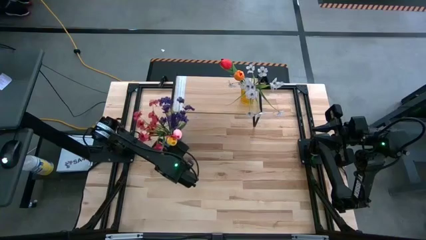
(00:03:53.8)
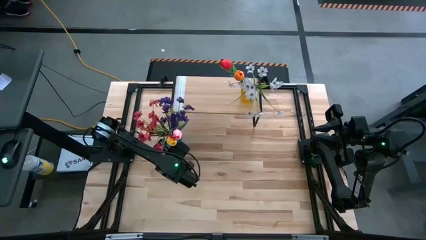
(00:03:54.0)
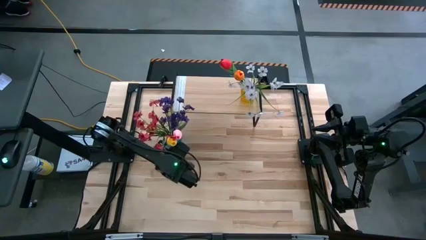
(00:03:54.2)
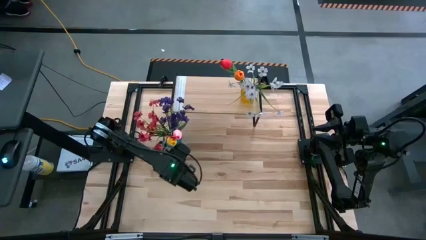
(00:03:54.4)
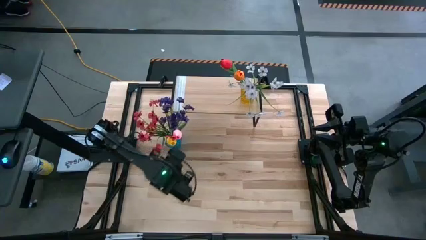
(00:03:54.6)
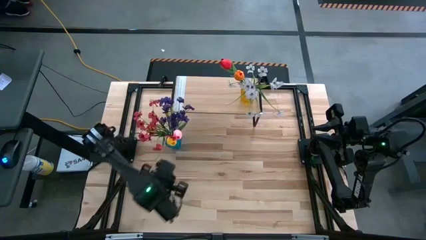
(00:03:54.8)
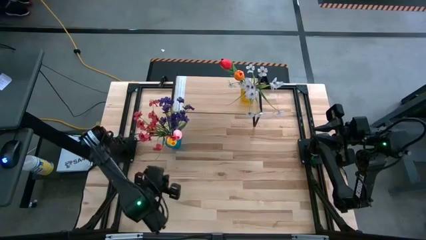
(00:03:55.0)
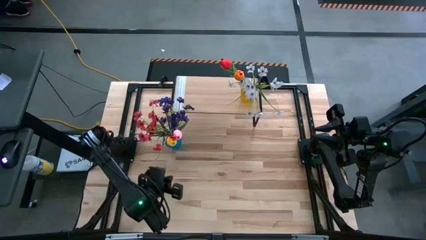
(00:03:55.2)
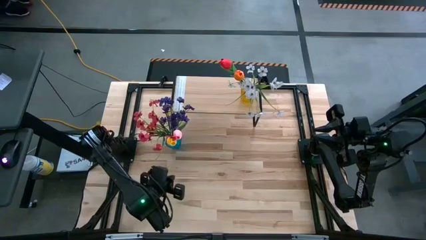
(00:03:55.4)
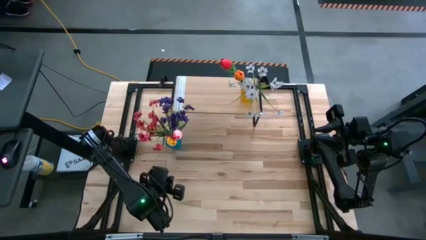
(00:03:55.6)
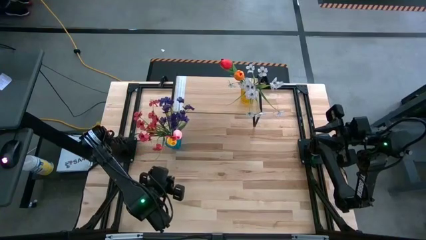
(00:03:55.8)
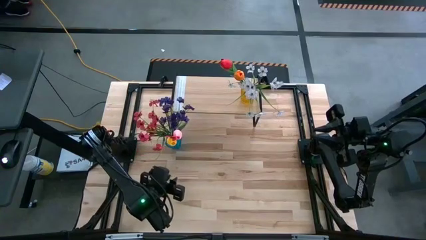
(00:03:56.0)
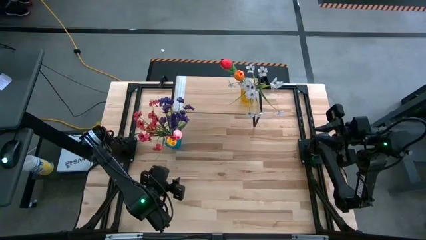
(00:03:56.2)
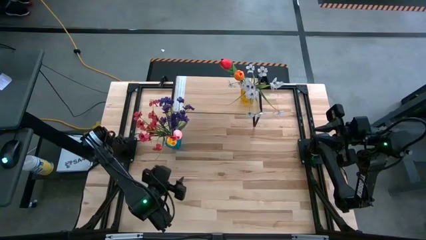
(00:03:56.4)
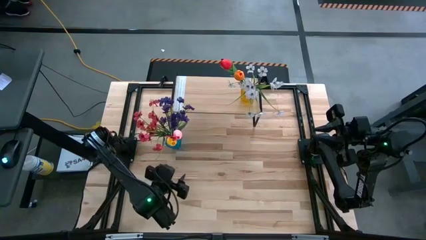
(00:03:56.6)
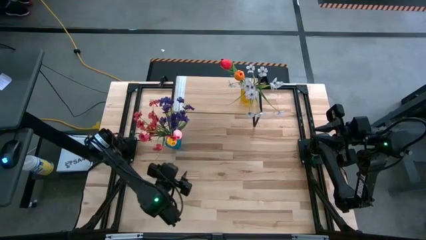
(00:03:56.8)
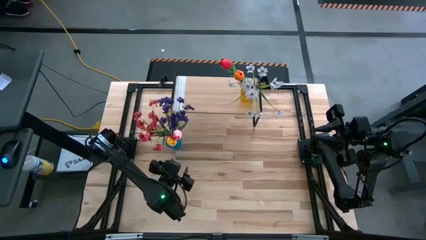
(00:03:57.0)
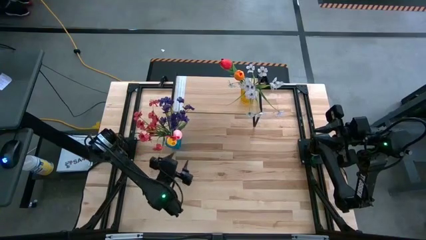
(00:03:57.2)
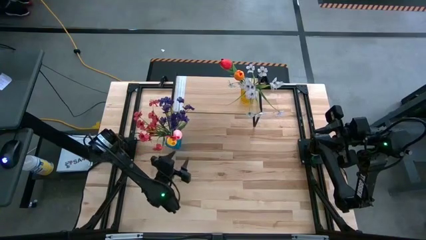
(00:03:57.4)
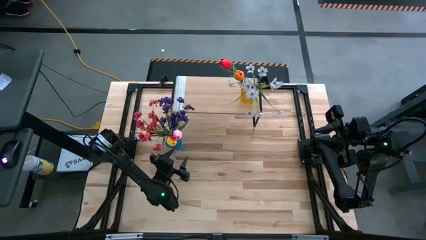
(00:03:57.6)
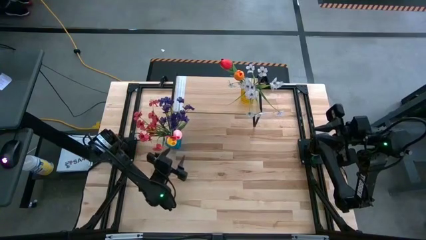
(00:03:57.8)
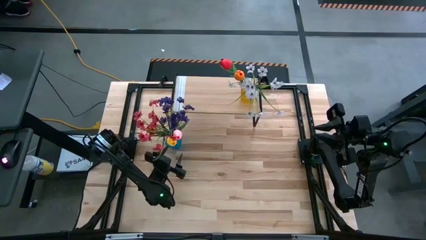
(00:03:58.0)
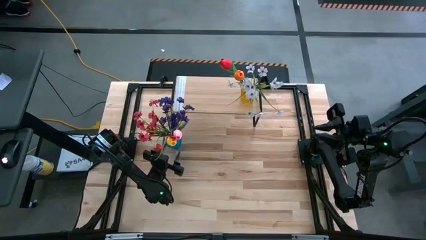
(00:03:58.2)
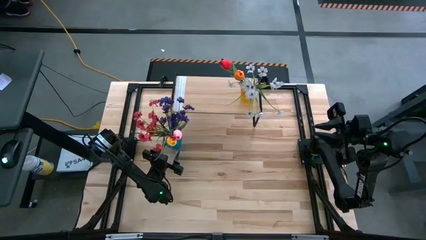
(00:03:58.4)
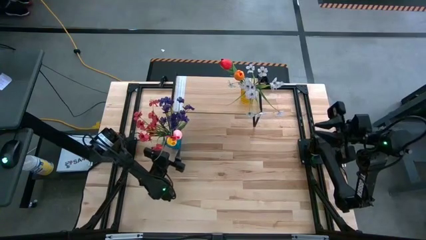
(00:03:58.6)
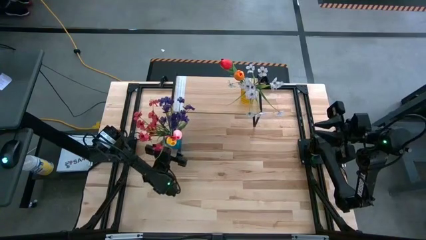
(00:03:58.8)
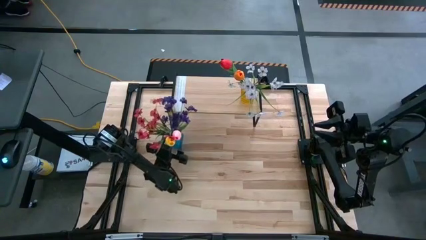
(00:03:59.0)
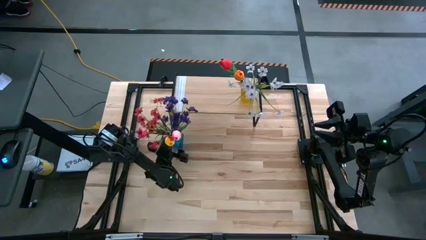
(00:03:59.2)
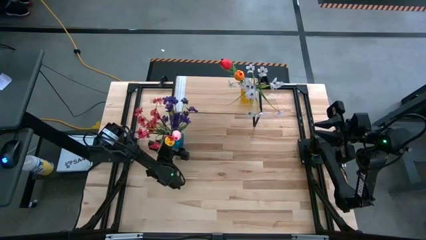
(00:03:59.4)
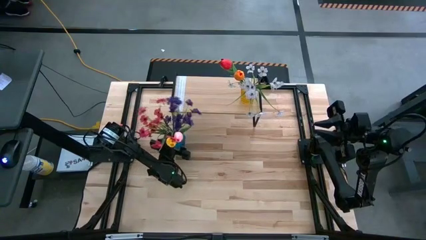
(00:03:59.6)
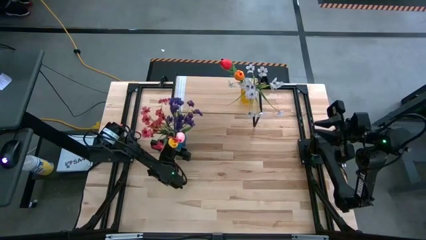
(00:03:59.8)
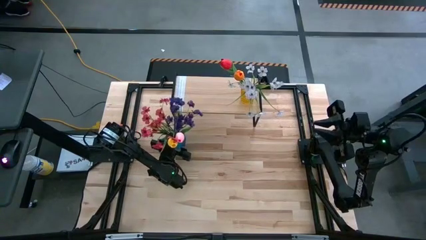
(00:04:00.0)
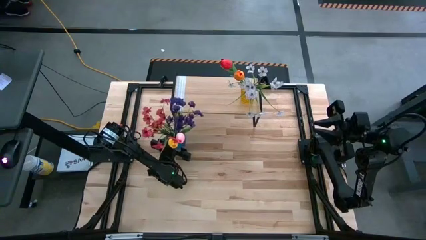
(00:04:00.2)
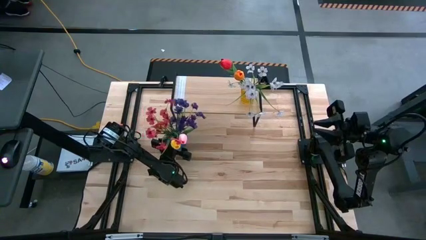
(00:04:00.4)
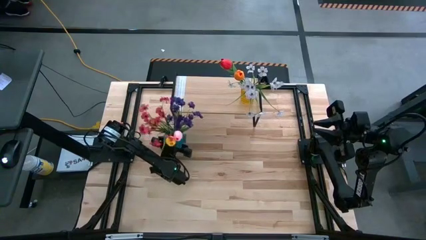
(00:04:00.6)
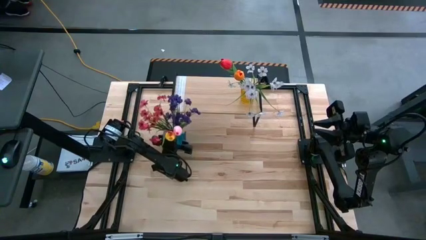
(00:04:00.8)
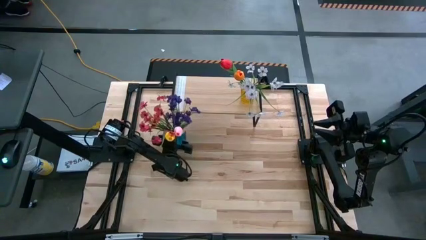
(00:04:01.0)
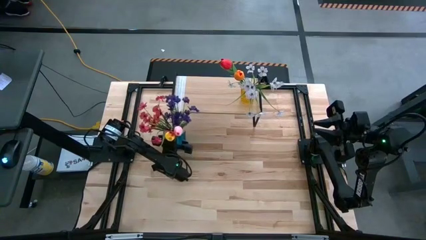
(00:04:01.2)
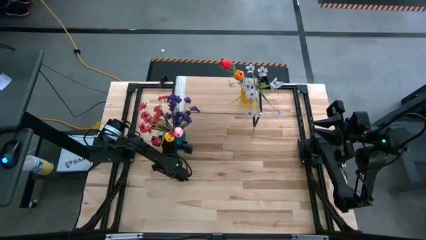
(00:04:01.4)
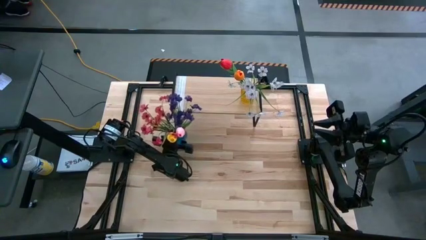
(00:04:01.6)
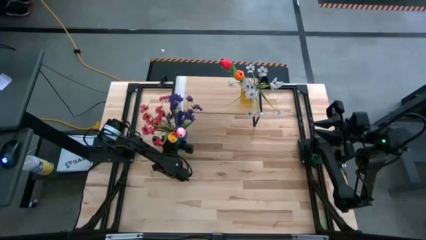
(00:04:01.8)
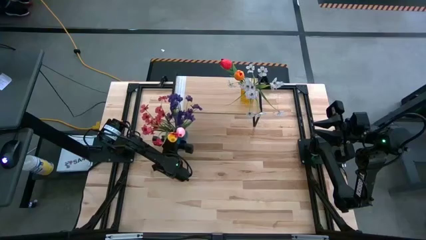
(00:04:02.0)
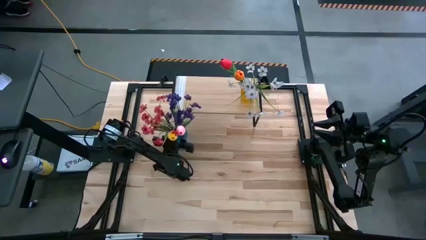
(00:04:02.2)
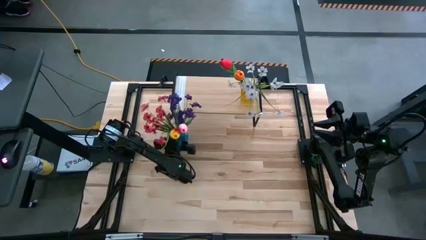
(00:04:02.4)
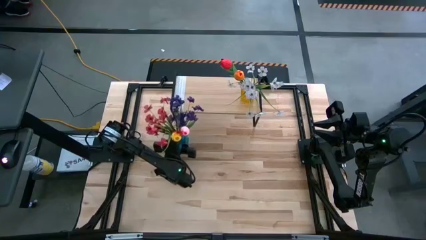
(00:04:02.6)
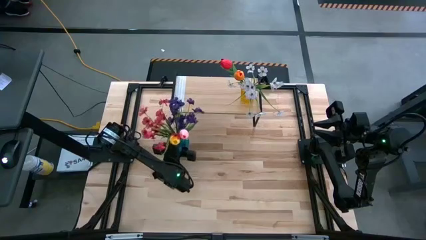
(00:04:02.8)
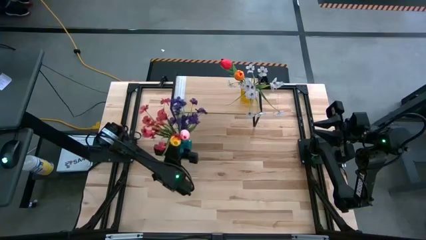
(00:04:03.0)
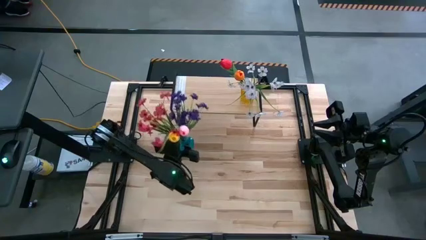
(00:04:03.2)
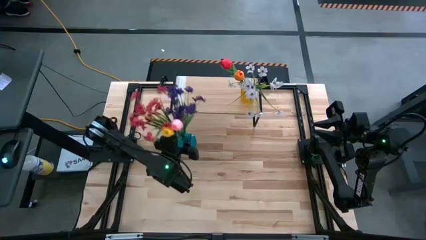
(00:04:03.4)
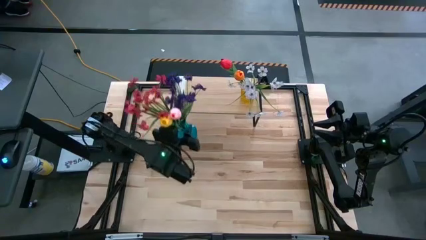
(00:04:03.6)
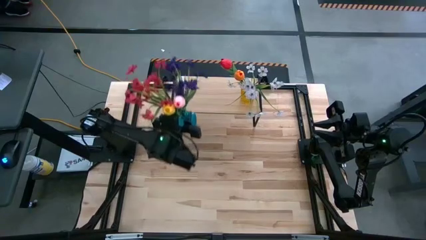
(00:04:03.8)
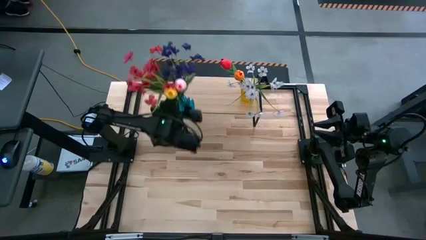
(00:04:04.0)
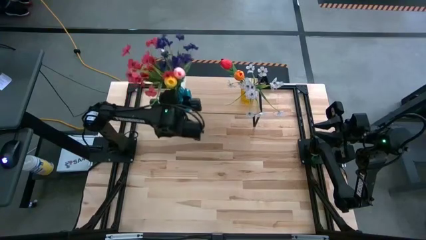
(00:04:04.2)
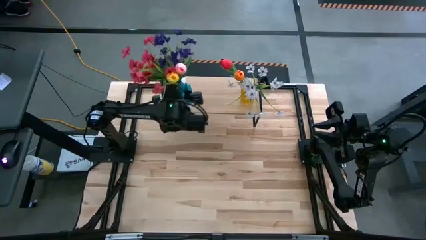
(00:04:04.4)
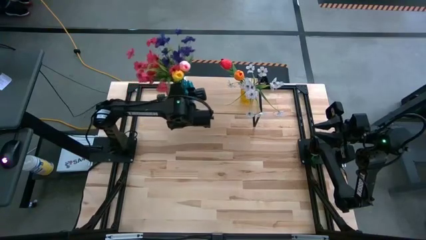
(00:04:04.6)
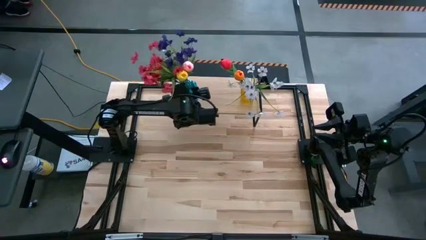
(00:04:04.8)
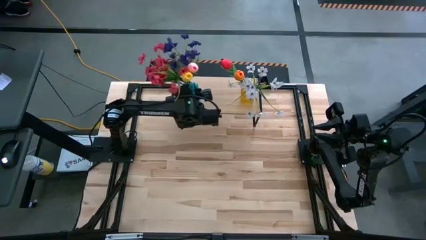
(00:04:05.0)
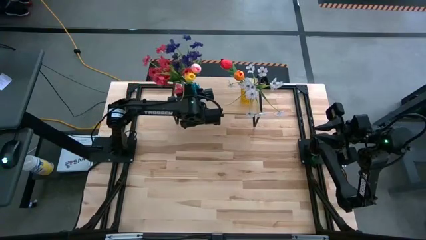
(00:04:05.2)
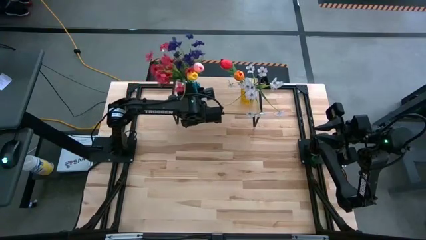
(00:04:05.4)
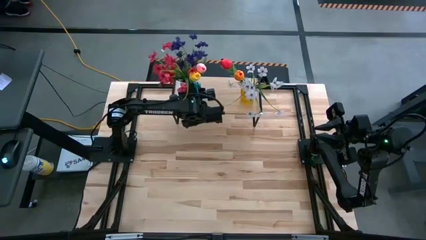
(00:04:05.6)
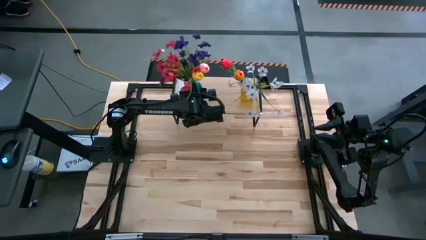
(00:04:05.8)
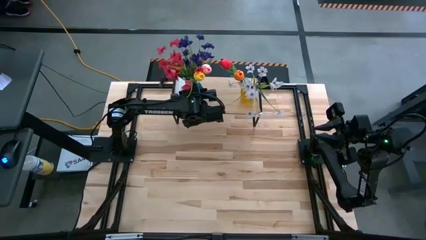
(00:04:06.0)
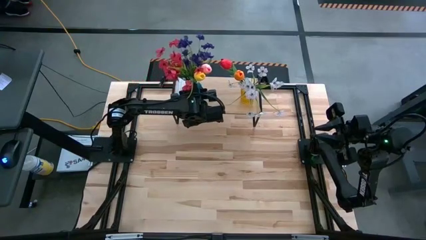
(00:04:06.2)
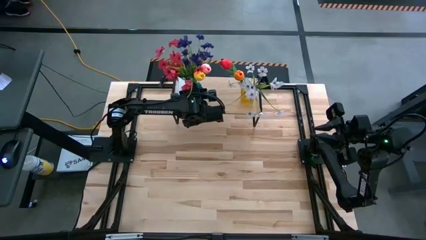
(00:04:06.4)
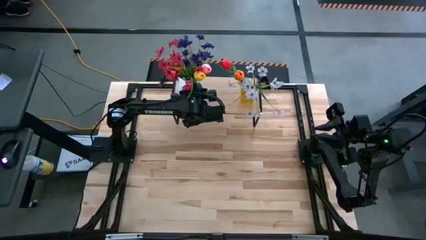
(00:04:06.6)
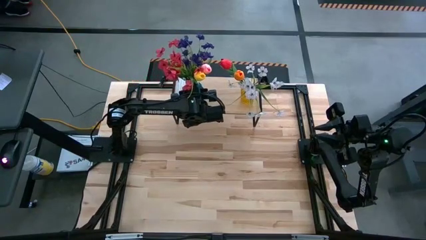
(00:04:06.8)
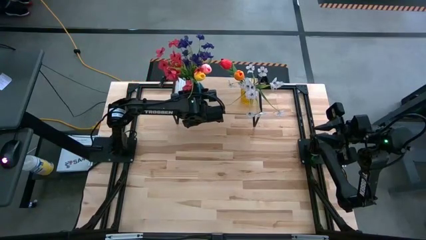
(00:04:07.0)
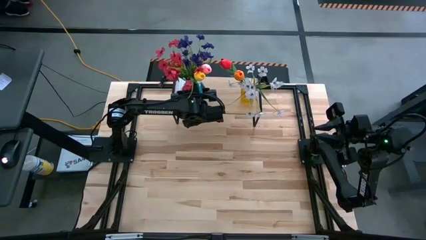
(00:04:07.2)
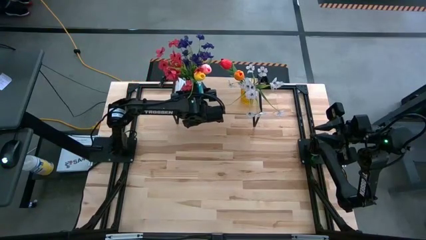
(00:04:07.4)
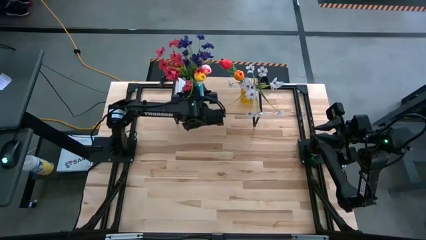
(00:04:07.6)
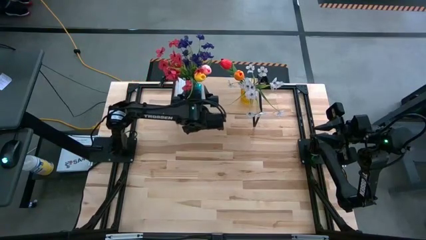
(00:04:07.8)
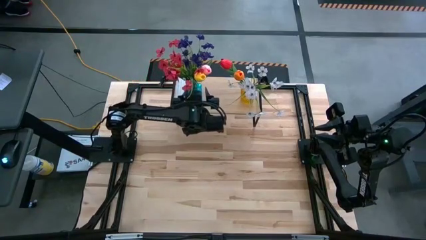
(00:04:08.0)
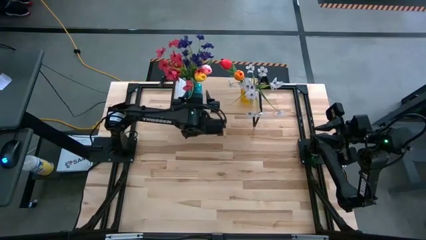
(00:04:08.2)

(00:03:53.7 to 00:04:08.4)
Task: Pick and place flowers into a vace then onto a shelf
Put the blue vase on the shelf

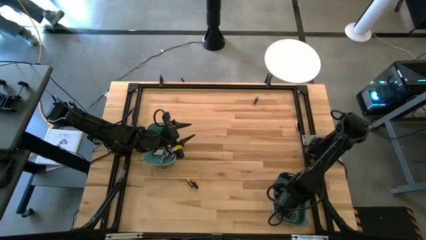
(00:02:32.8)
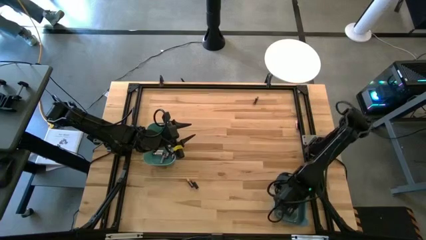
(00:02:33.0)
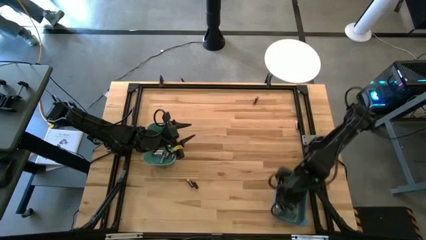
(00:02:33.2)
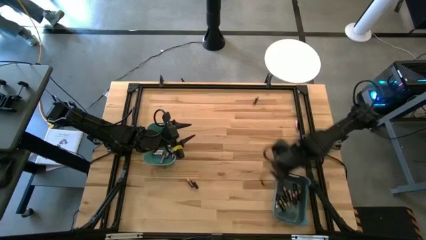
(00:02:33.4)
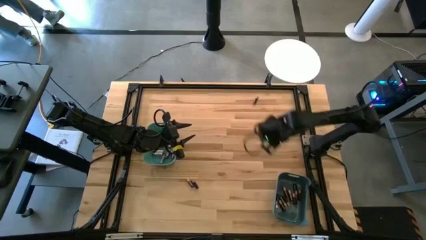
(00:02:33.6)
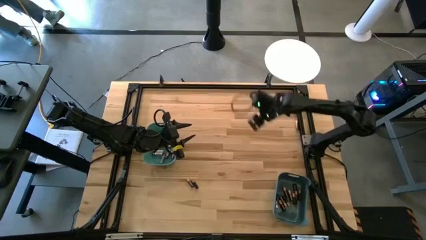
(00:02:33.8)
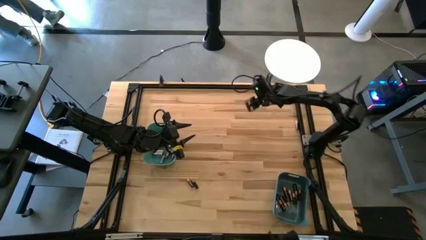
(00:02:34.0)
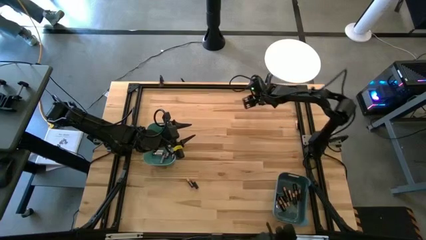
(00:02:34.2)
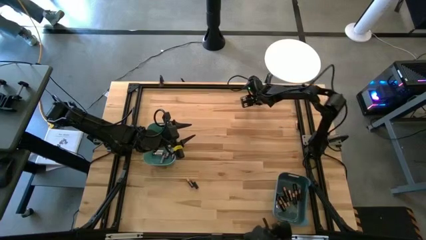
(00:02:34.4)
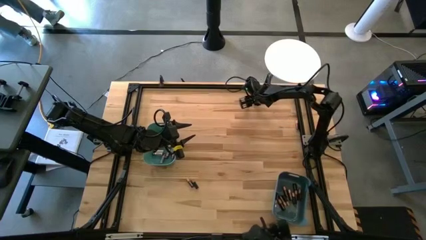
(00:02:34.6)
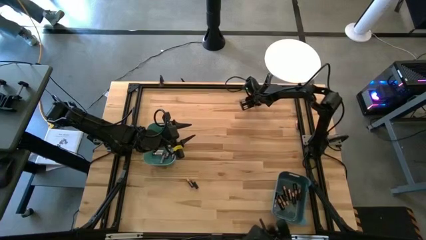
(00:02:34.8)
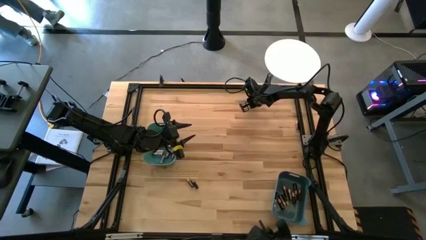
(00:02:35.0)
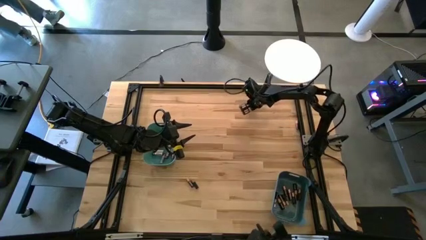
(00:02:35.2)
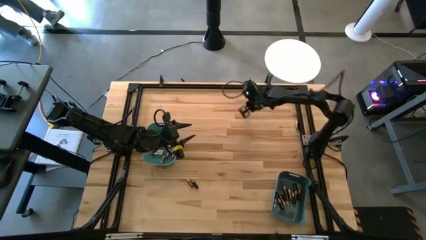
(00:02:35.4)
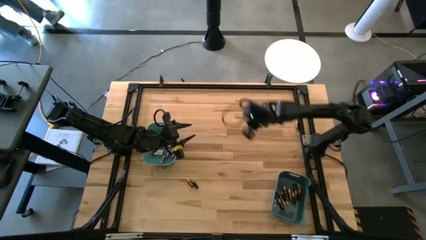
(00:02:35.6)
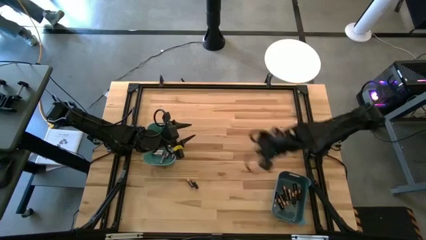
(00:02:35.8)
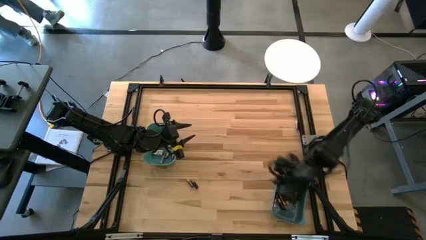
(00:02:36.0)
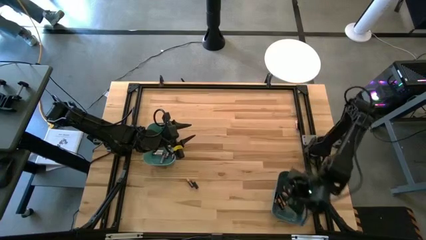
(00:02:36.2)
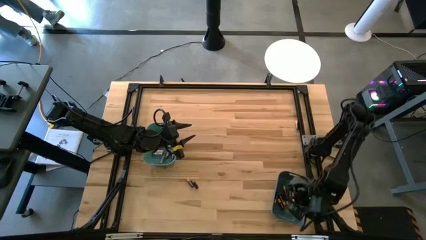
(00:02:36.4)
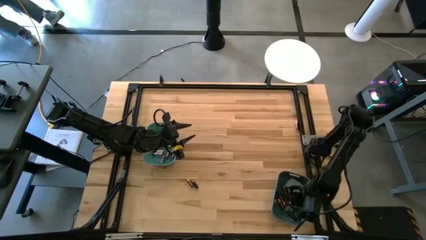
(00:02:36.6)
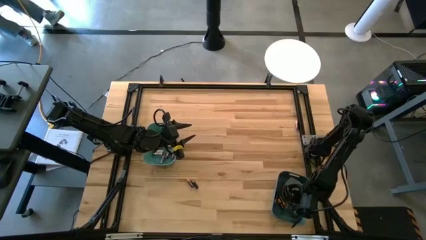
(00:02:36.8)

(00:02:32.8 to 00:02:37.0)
Task: Sort batteries
Put the black battery into the blue bin
